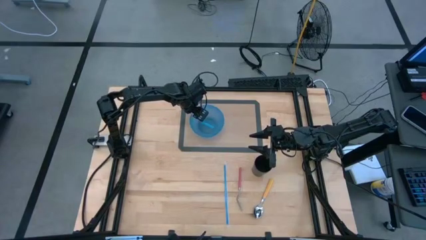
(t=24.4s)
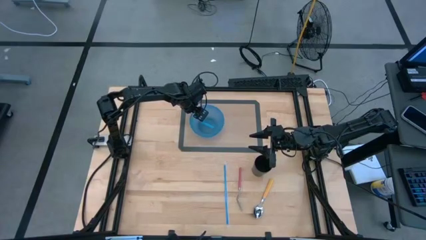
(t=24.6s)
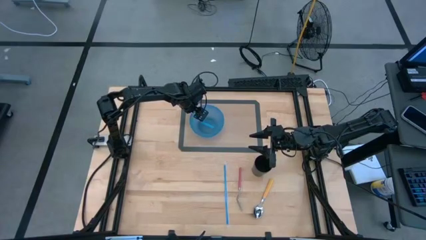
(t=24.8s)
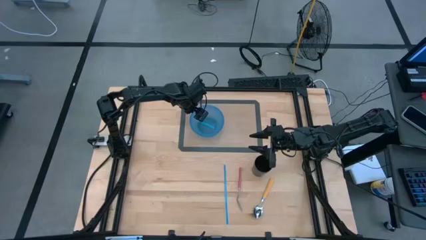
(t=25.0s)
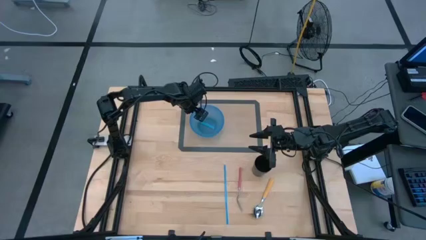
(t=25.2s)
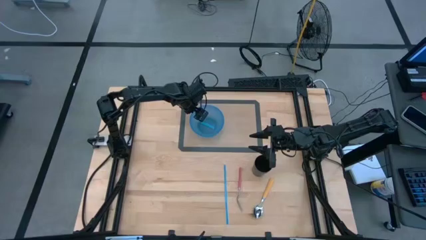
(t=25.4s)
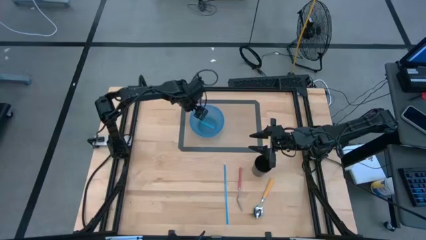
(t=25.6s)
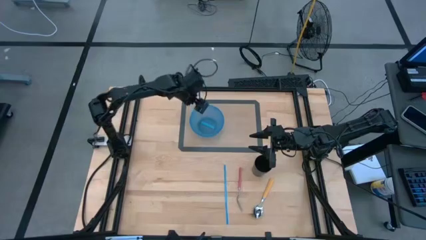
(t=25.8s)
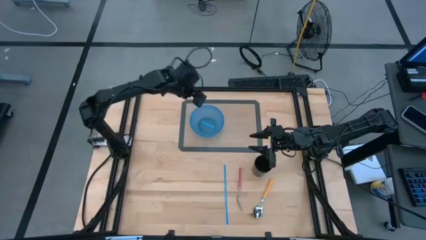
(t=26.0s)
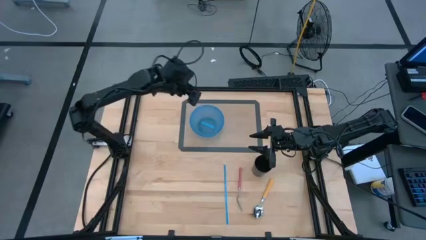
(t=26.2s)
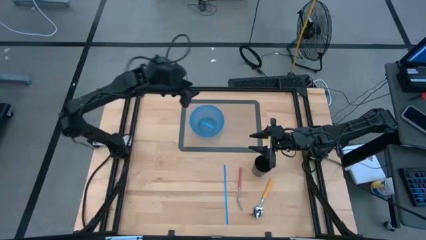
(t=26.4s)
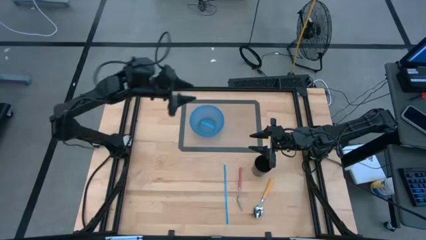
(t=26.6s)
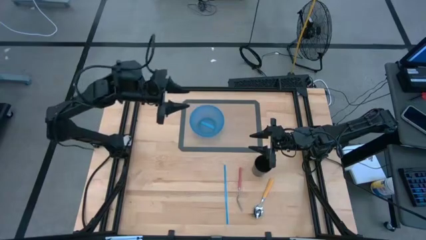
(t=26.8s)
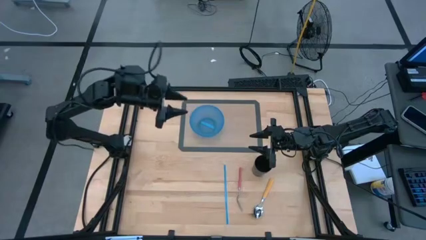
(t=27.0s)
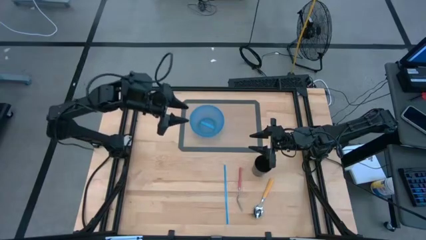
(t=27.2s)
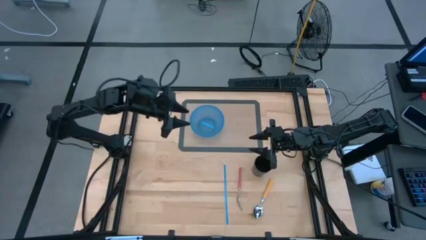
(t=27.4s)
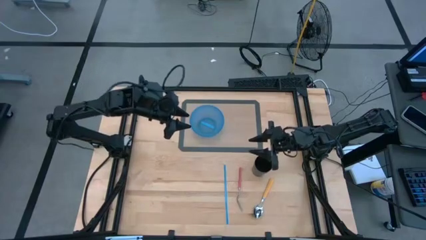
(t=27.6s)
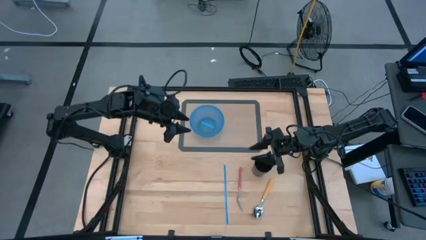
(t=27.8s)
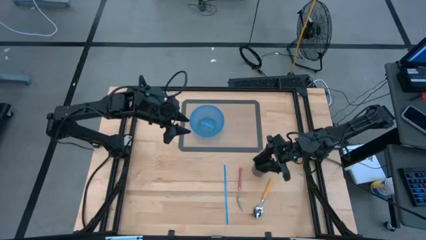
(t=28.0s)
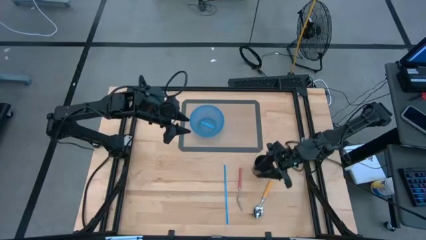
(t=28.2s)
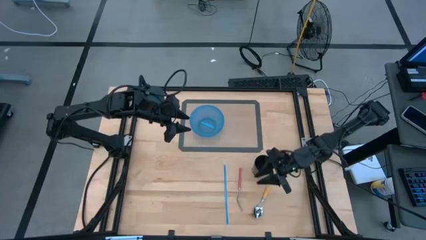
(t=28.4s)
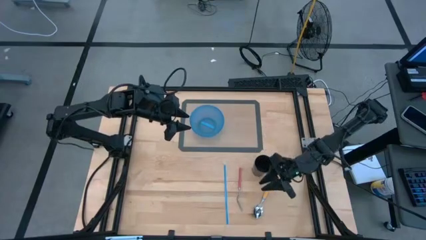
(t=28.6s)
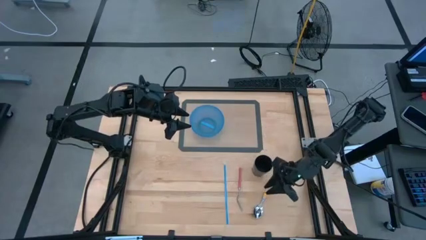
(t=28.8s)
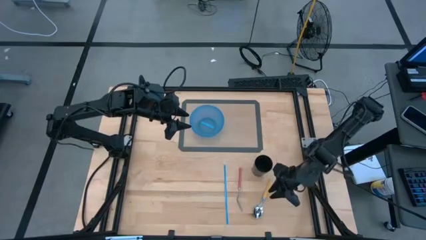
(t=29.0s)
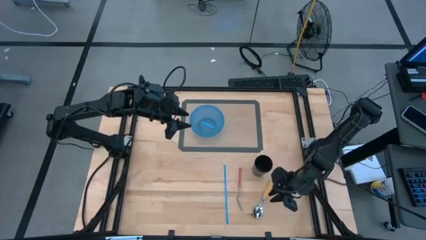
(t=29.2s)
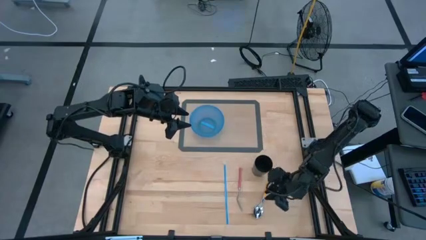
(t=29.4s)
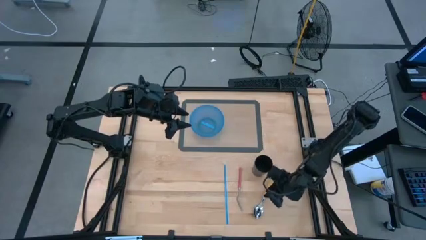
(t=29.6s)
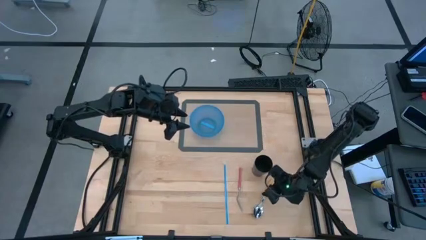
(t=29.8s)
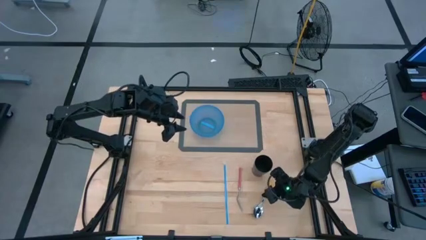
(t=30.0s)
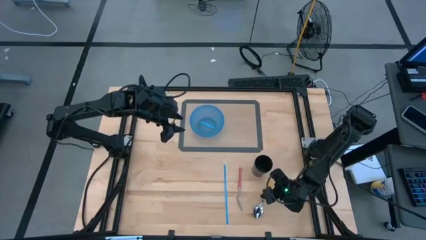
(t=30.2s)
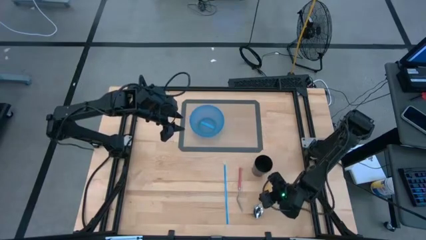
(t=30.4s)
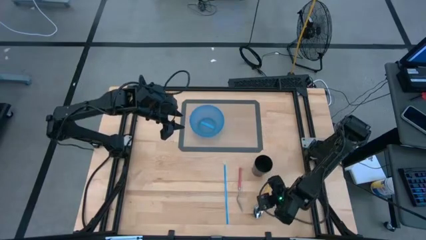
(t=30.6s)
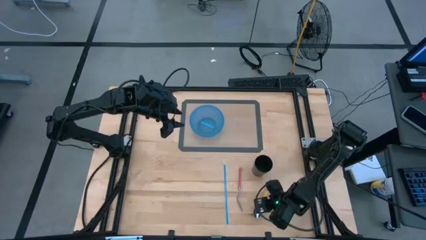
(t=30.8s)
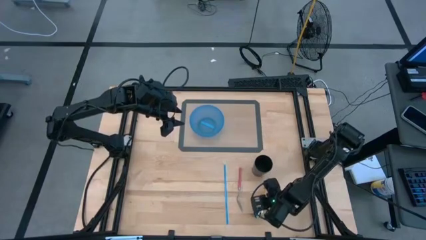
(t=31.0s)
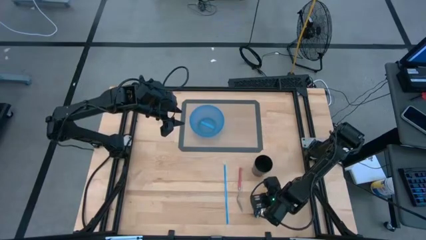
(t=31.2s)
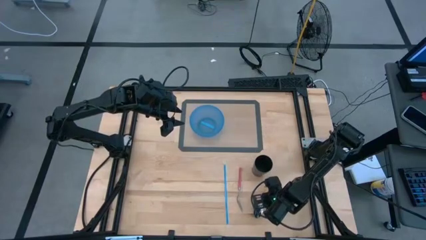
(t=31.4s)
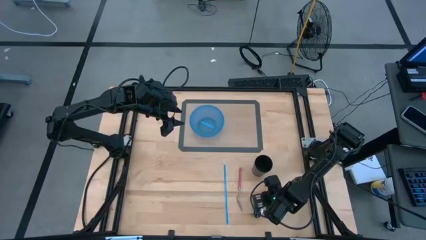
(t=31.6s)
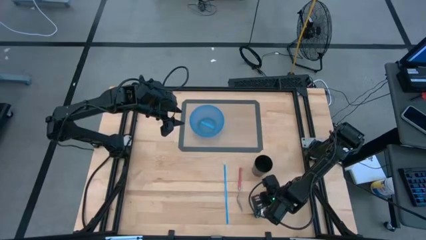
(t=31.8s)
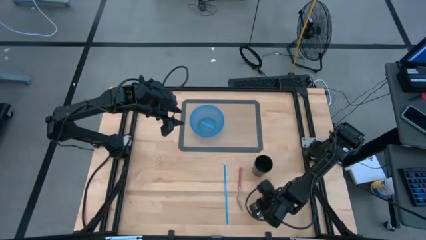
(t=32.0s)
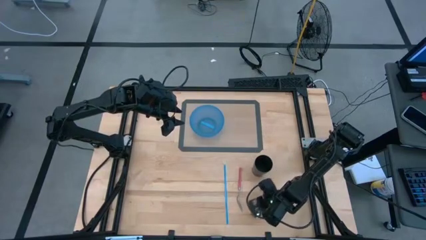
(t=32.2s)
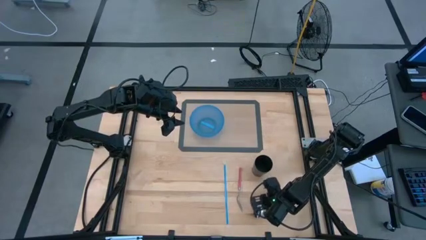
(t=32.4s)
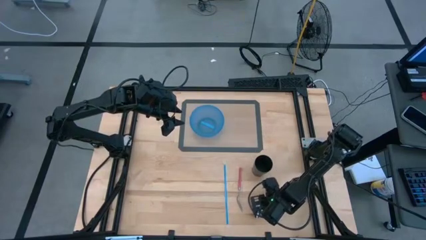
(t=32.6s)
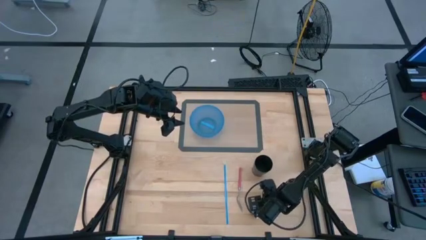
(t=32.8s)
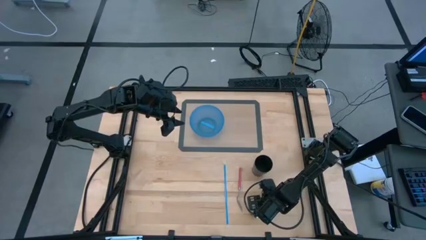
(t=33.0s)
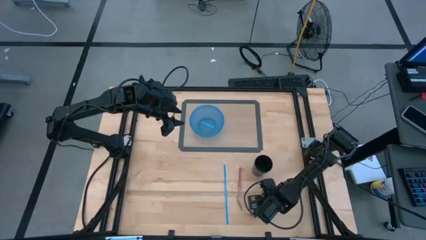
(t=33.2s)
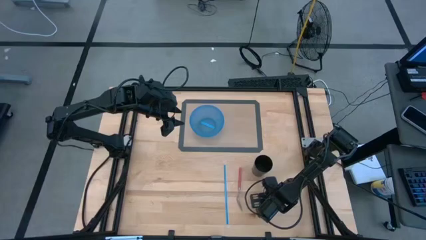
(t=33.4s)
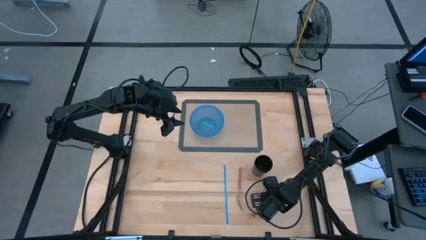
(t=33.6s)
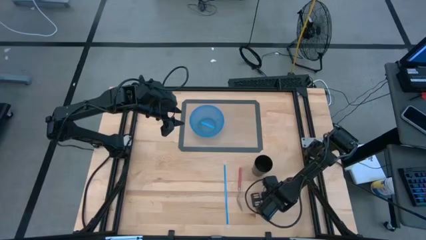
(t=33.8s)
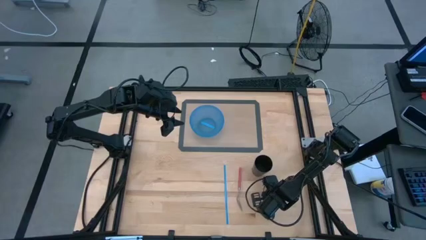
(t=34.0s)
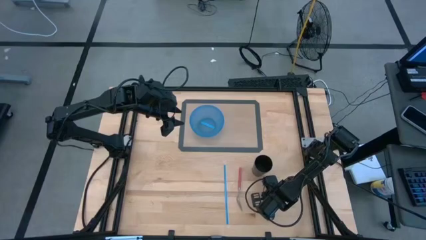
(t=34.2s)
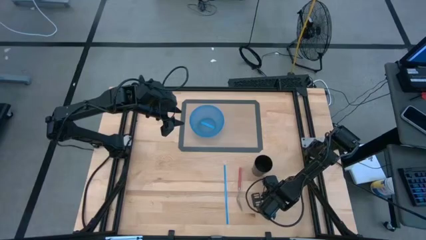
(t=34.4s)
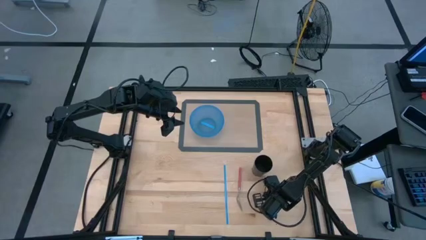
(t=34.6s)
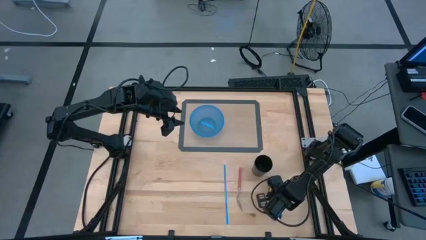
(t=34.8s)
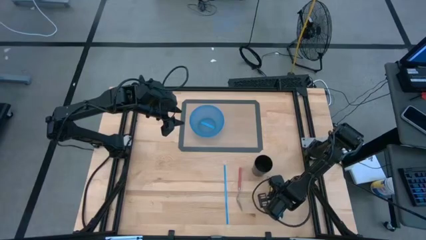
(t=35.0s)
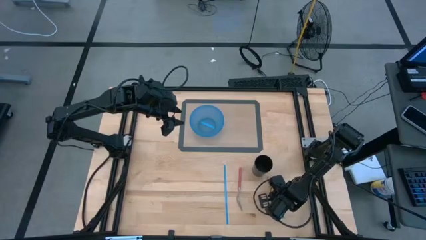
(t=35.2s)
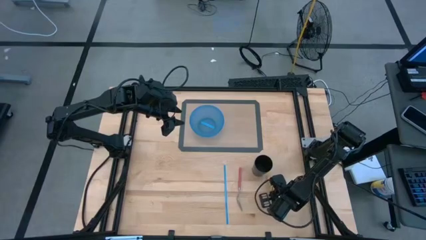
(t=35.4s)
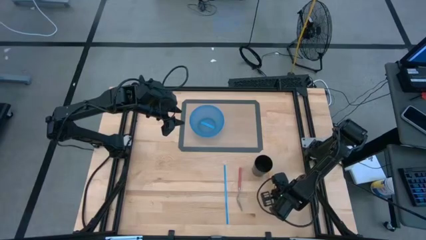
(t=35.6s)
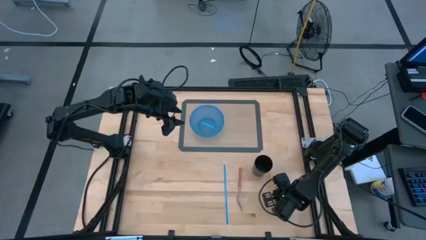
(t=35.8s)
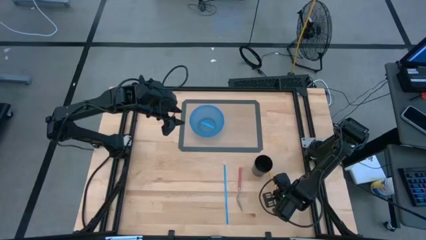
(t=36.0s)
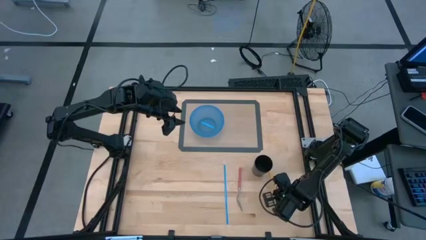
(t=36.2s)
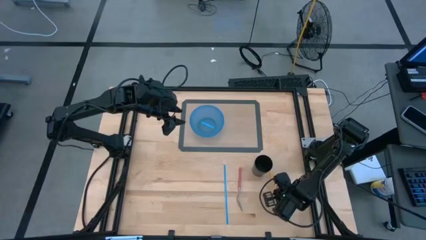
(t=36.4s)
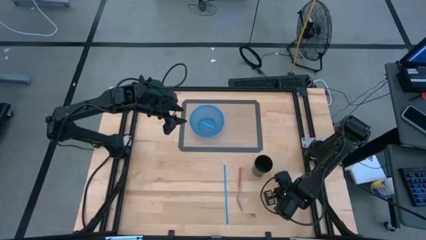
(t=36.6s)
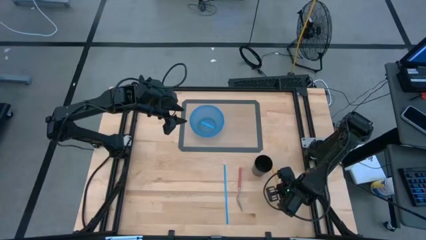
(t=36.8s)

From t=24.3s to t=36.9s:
Task: Pick & Place Utensil
Put the yellow spoon into the bowl
